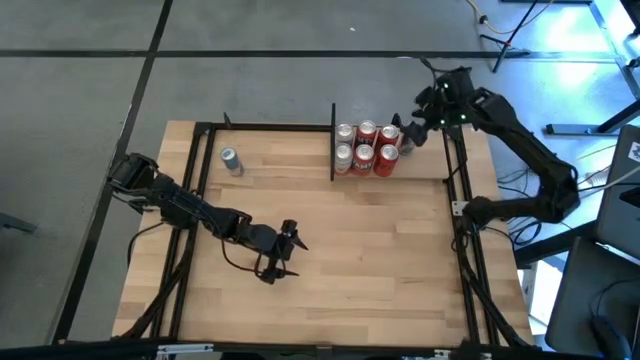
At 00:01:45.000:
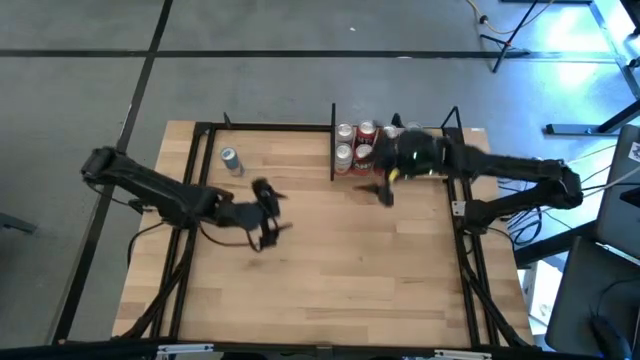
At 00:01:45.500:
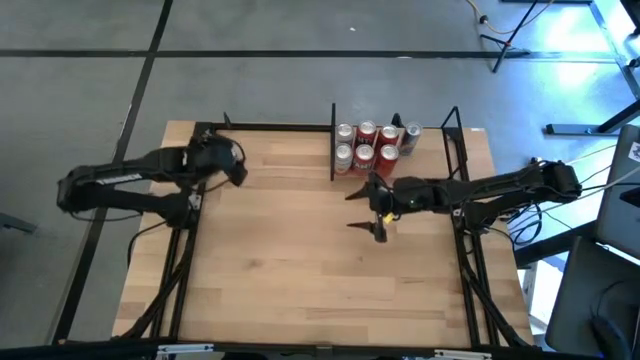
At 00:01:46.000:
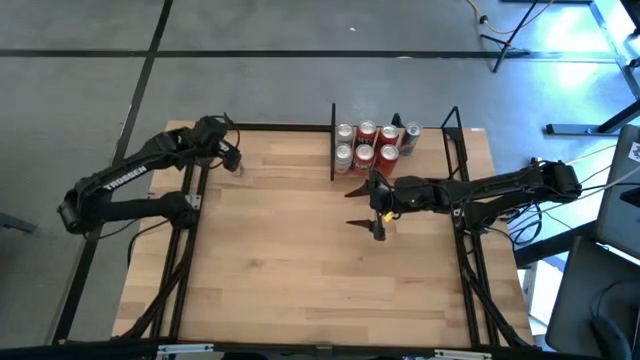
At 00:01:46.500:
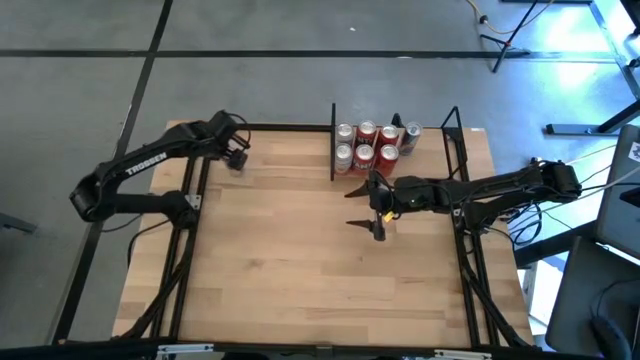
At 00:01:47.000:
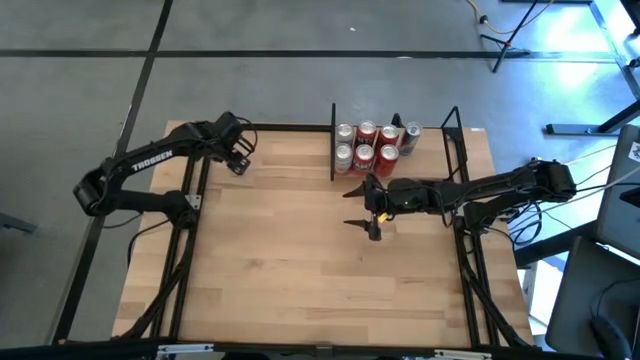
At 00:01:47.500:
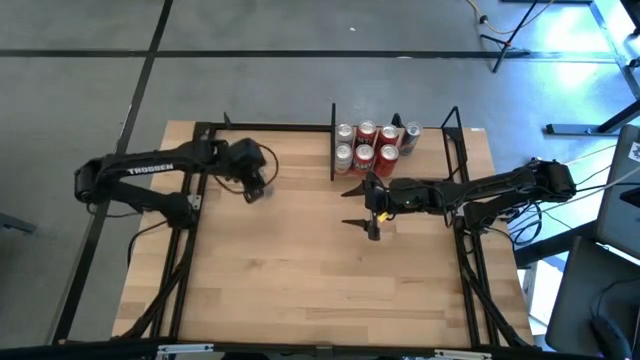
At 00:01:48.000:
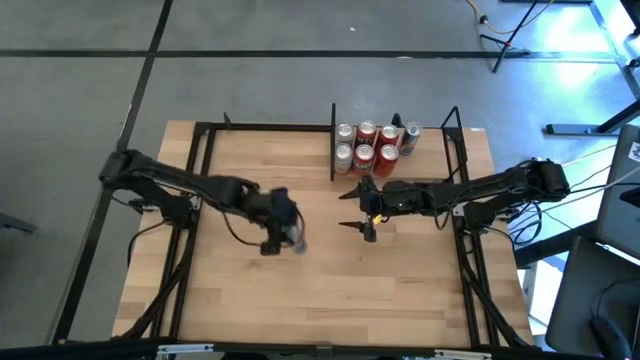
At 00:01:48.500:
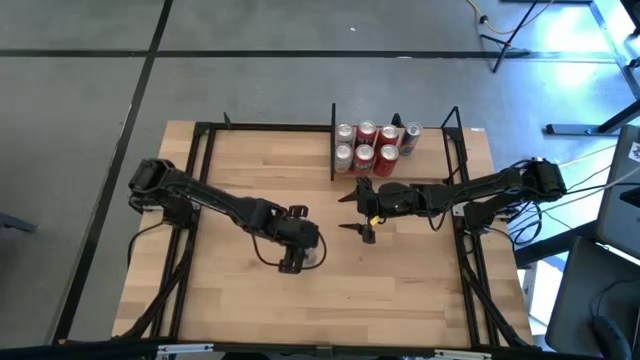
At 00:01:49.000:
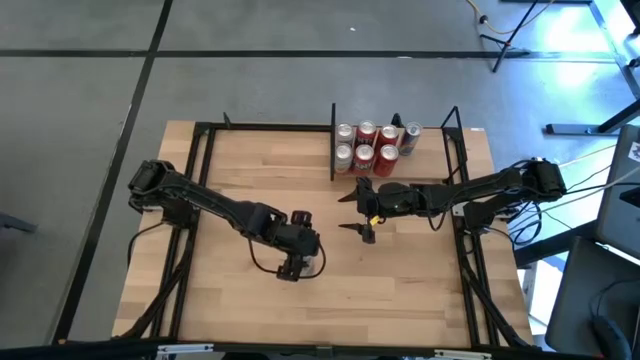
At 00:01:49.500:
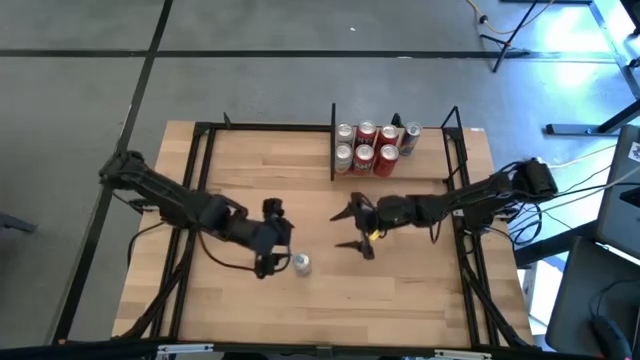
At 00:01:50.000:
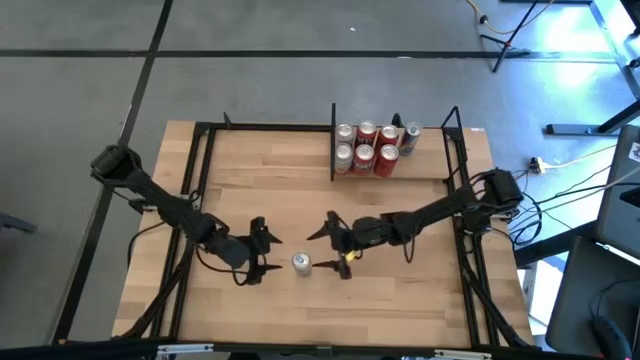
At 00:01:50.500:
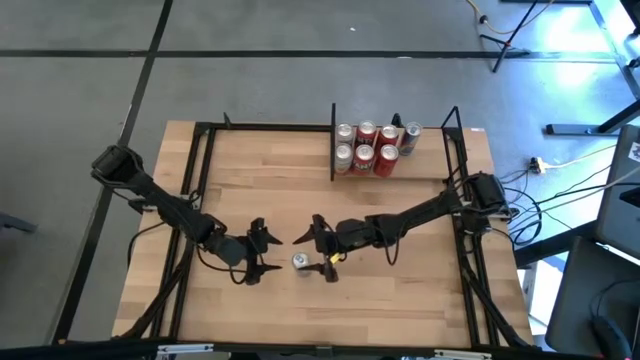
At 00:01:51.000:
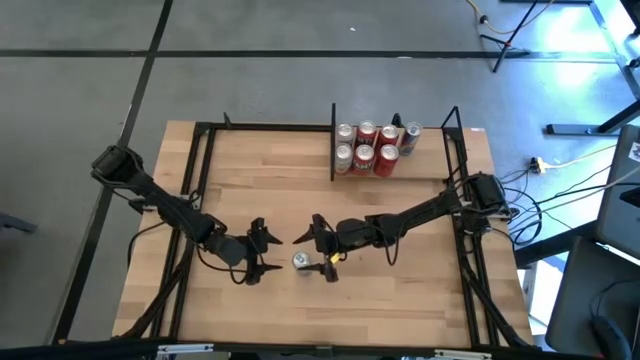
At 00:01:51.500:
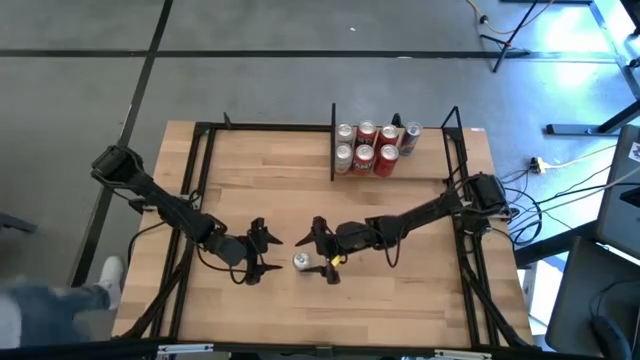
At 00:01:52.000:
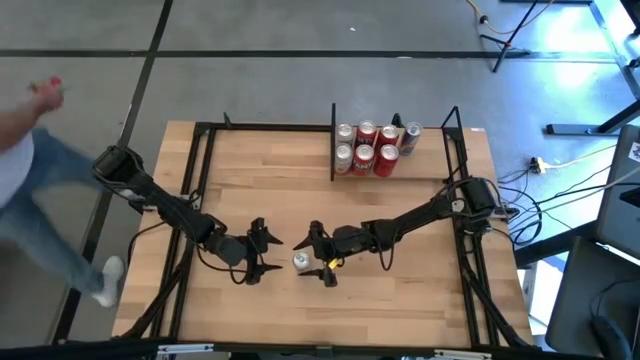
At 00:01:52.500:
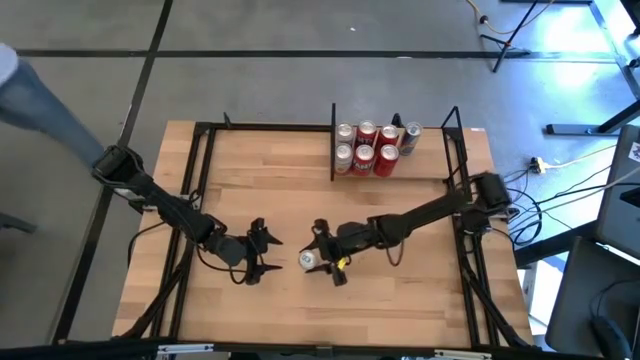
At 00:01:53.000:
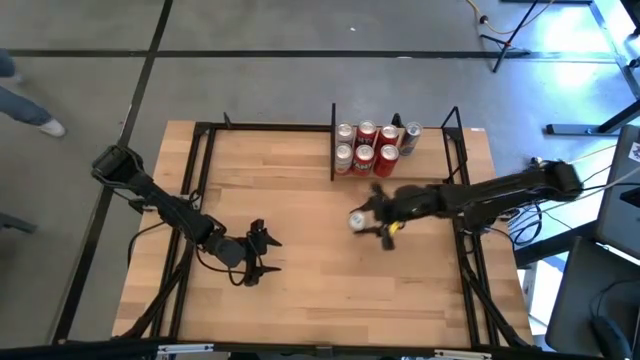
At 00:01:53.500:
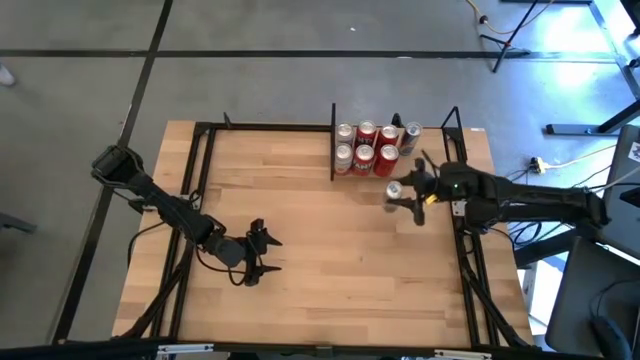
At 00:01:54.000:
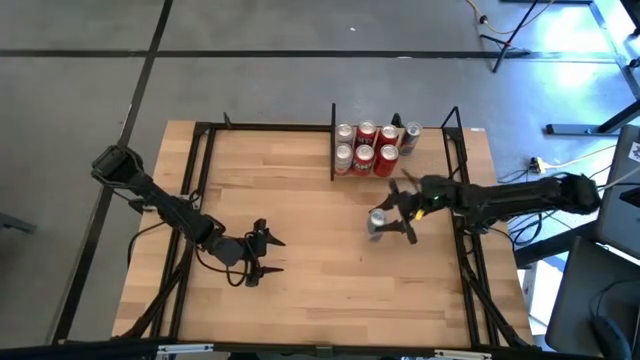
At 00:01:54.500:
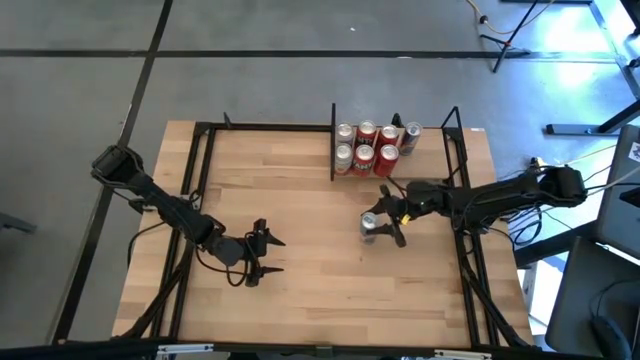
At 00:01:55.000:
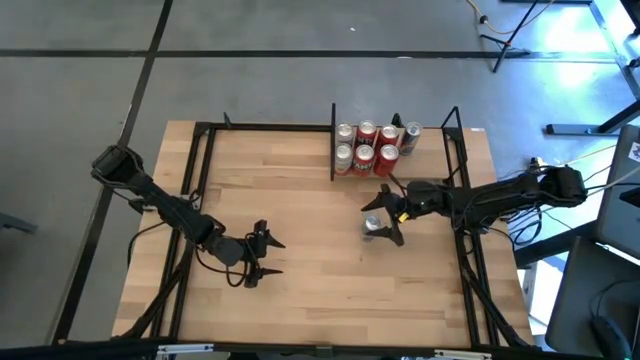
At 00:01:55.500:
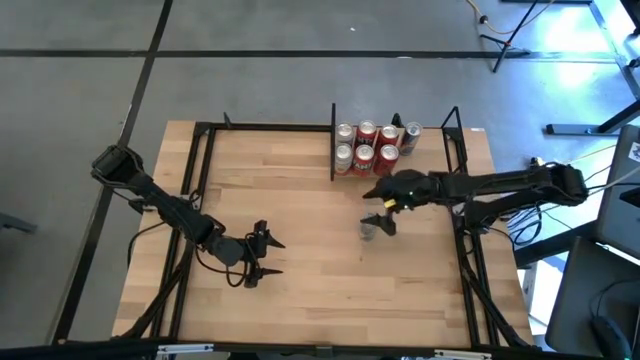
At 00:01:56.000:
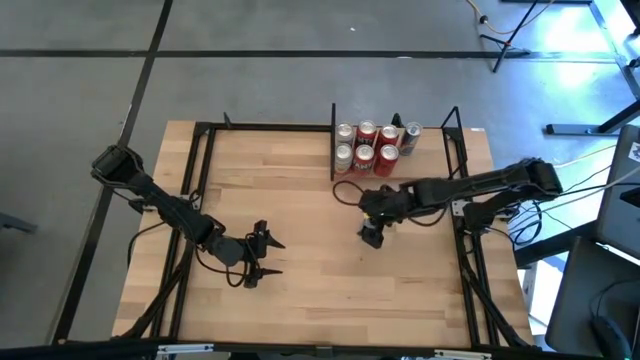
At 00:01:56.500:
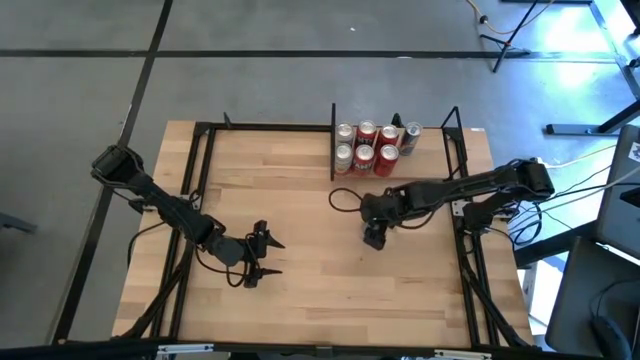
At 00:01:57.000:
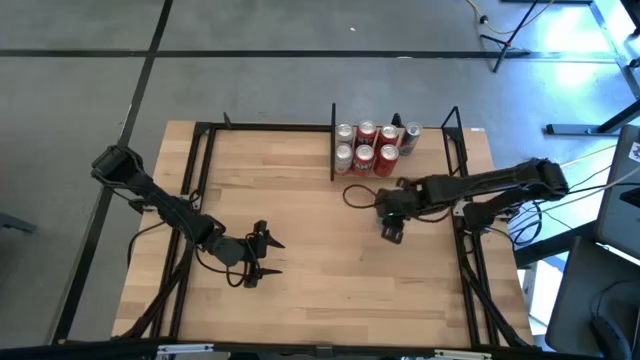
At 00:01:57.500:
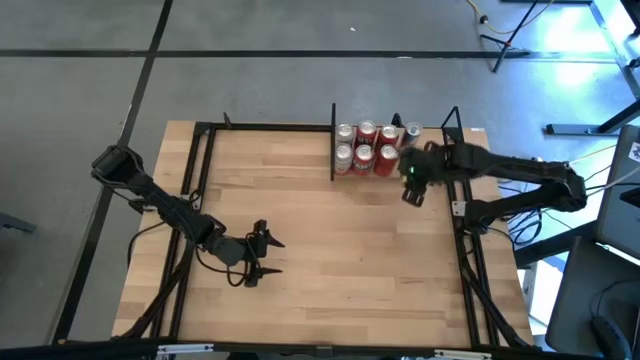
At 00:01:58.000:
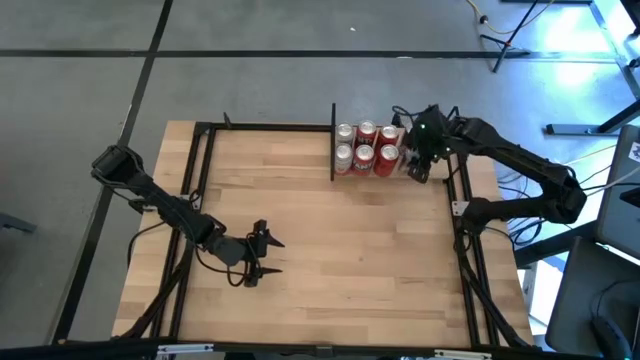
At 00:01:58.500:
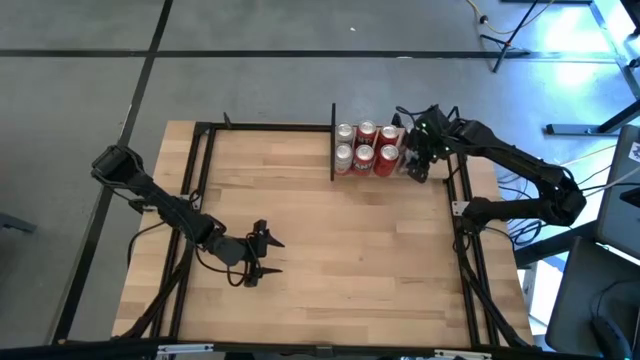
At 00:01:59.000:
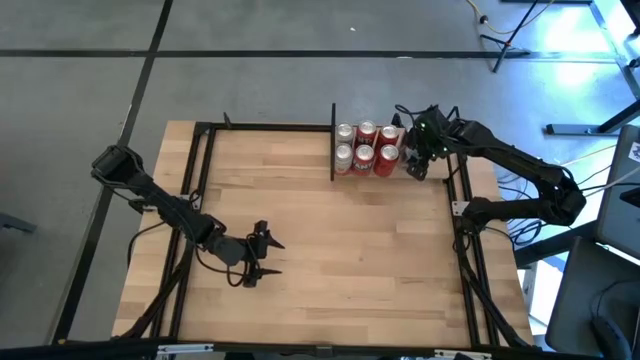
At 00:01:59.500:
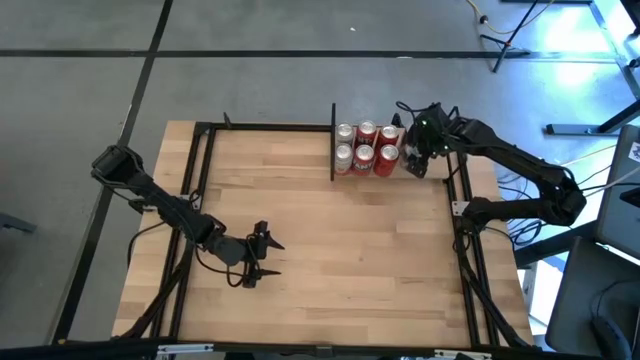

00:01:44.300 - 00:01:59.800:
Task: Place canned beverage on shelf
Put the blue soda can on the shelf aligned with the other blue soda can

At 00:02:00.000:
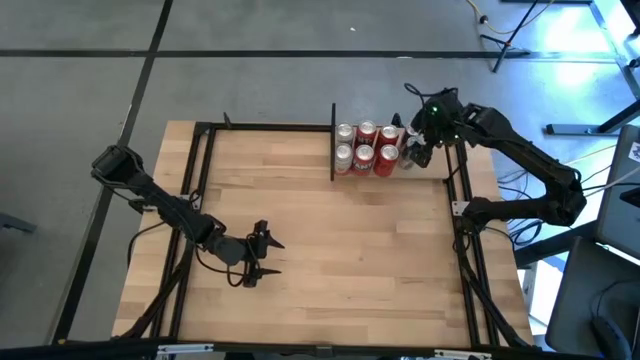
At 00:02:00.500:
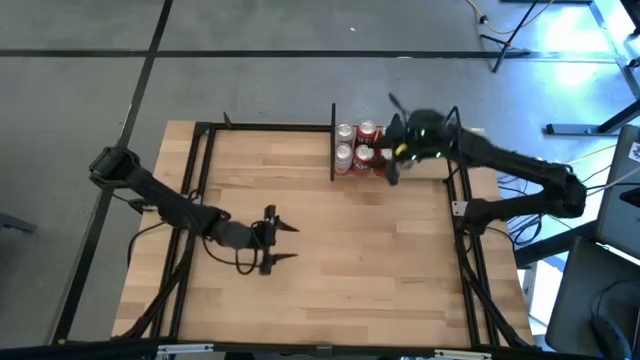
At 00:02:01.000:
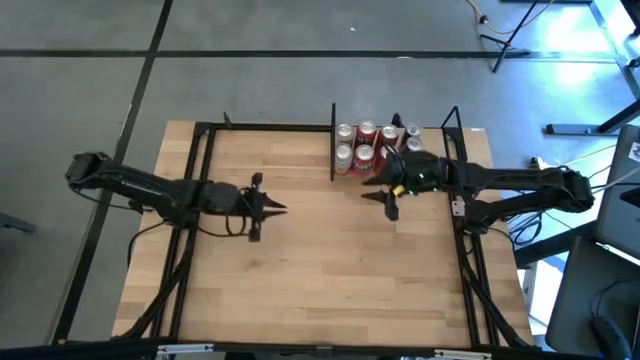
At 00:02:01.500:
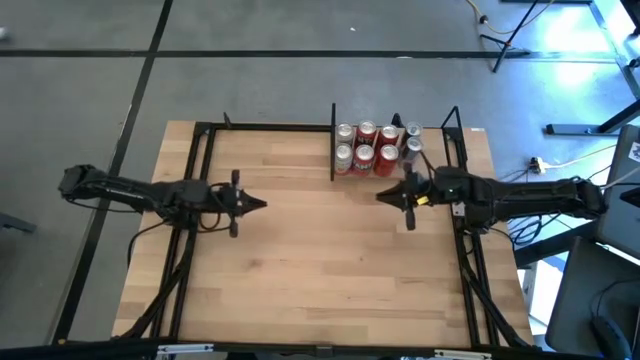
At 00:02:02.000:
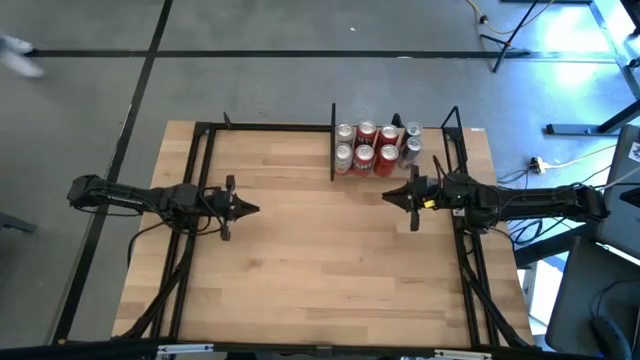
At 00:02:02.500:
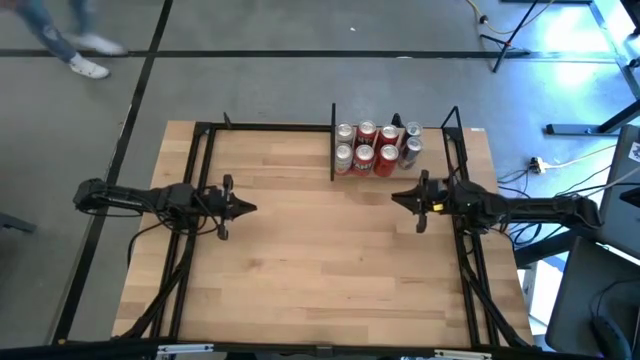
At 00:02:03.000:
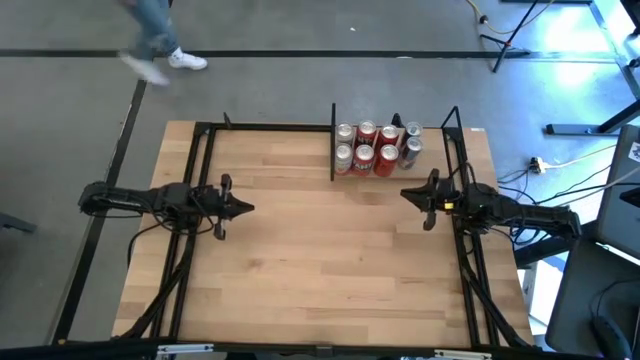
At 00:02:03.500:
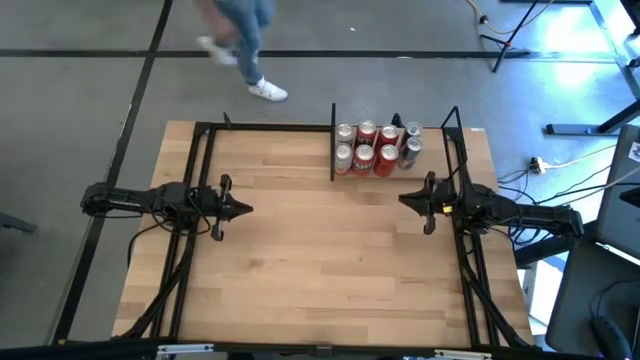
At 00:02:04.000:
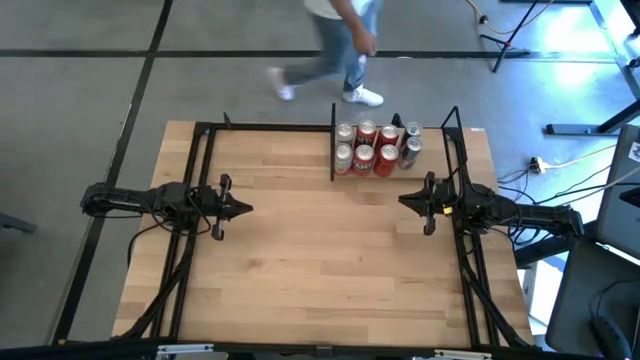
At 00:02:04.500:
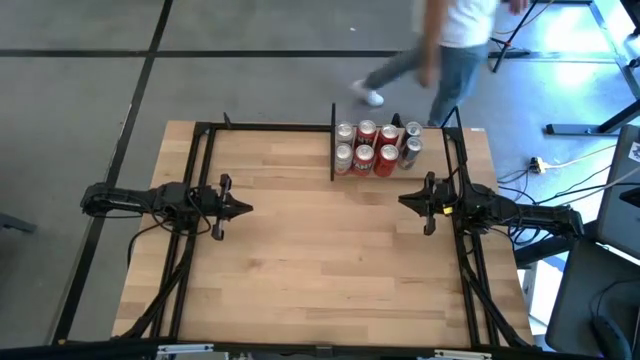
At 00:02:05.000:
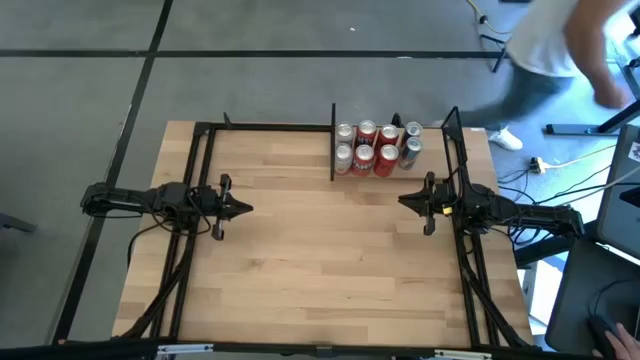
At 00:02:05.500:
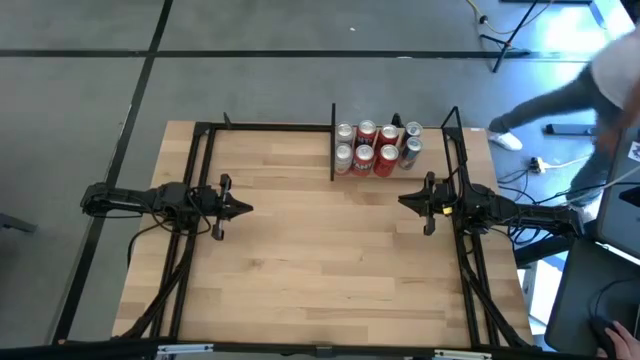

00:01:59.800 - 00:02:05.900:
Return to Home Position
